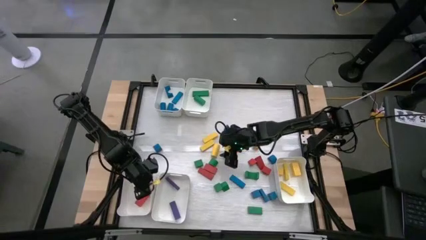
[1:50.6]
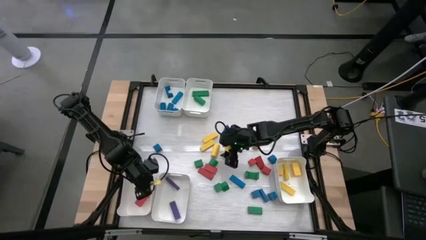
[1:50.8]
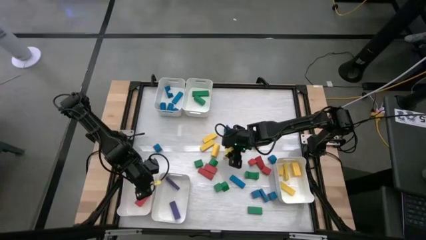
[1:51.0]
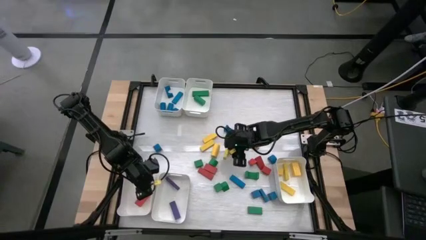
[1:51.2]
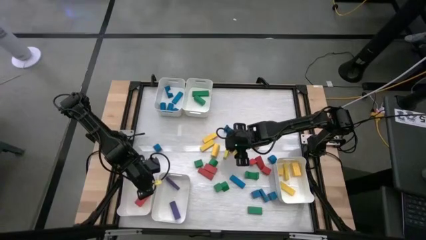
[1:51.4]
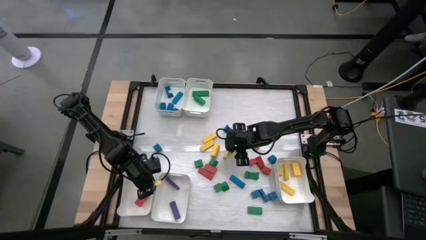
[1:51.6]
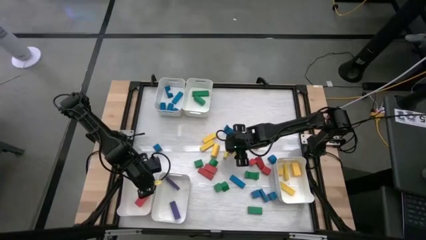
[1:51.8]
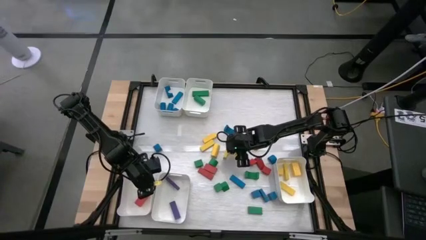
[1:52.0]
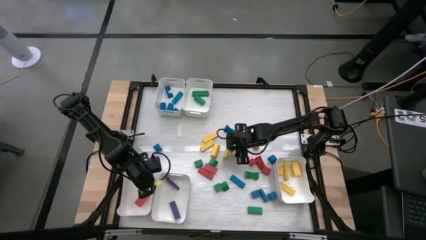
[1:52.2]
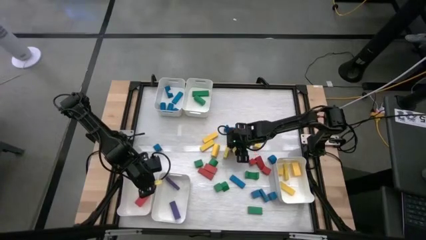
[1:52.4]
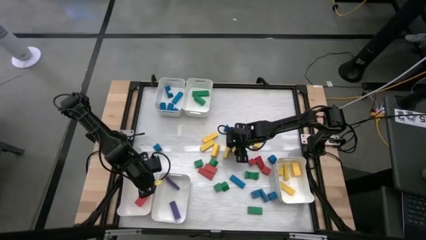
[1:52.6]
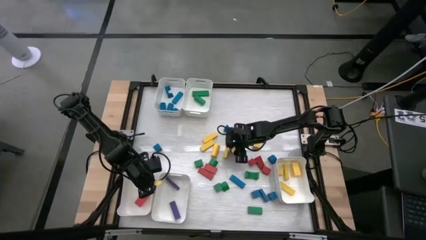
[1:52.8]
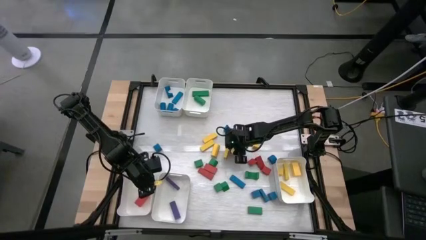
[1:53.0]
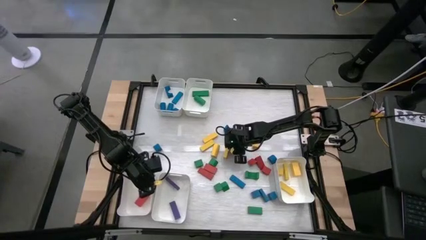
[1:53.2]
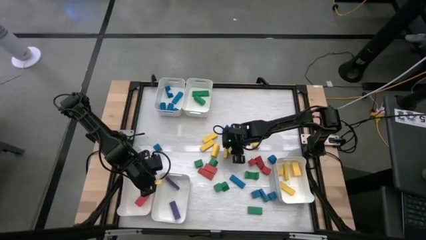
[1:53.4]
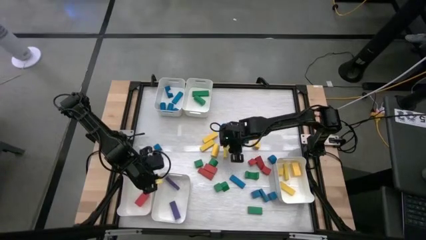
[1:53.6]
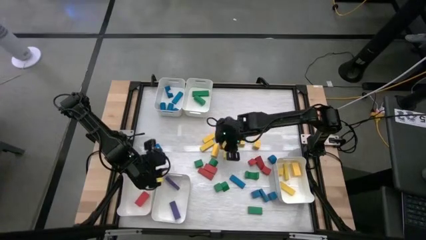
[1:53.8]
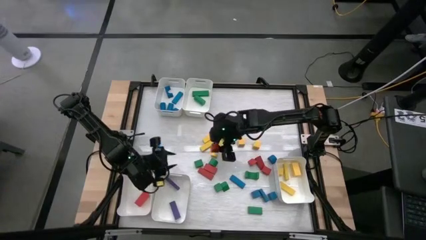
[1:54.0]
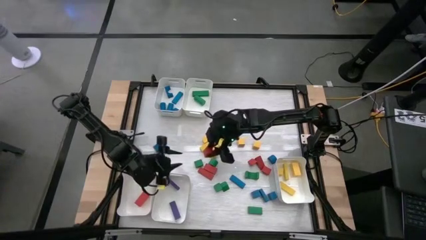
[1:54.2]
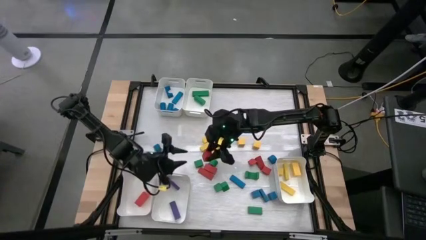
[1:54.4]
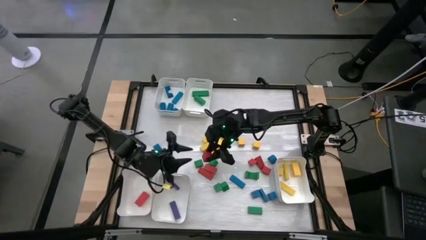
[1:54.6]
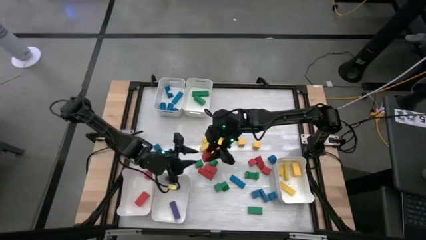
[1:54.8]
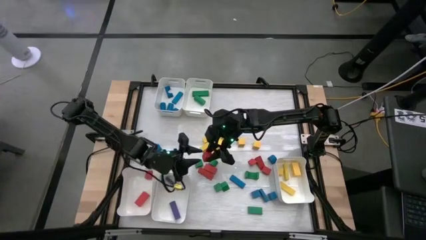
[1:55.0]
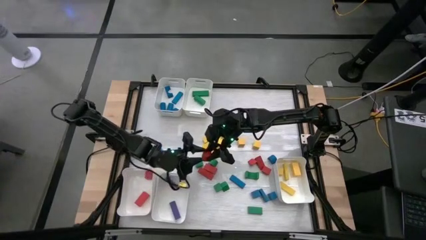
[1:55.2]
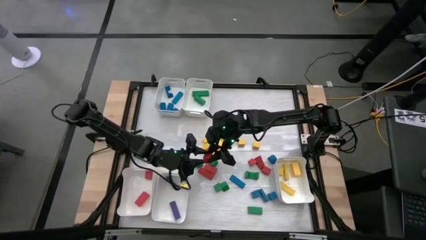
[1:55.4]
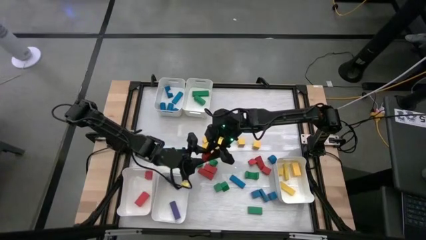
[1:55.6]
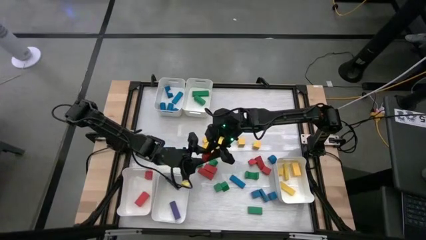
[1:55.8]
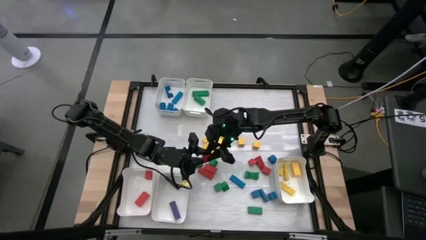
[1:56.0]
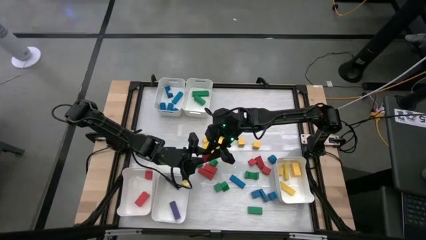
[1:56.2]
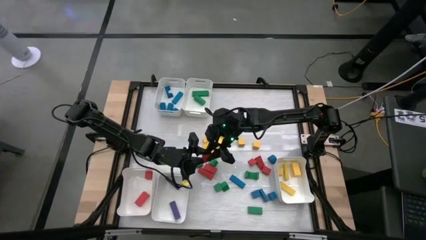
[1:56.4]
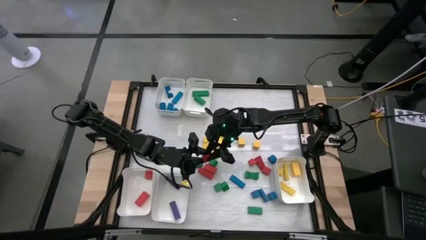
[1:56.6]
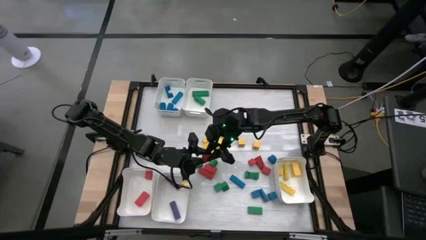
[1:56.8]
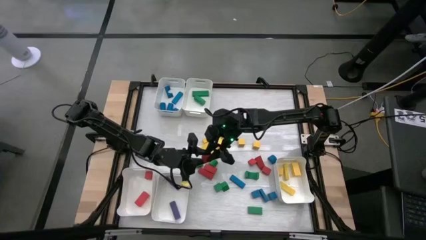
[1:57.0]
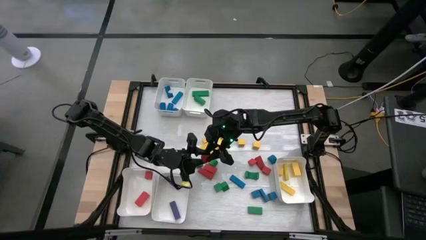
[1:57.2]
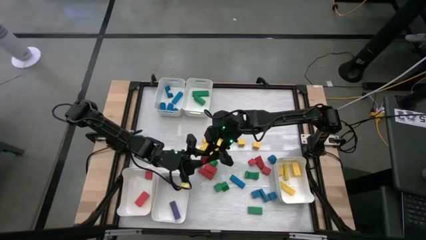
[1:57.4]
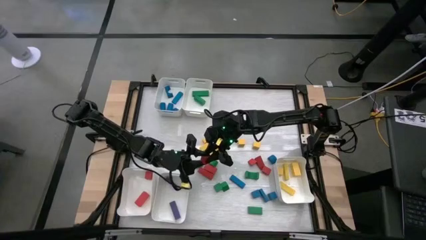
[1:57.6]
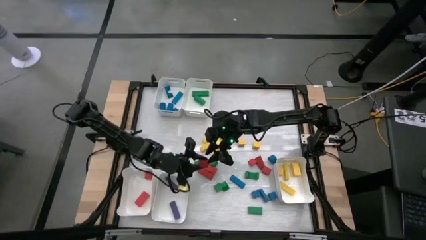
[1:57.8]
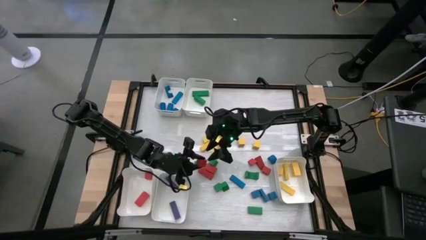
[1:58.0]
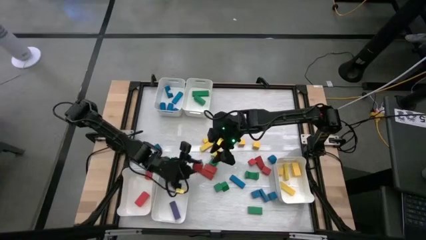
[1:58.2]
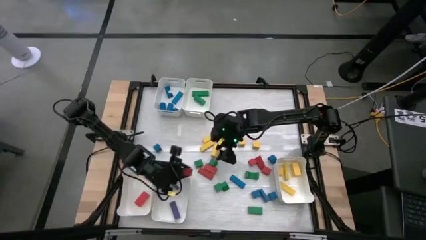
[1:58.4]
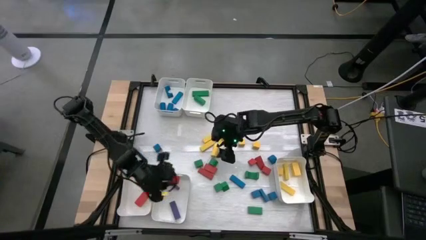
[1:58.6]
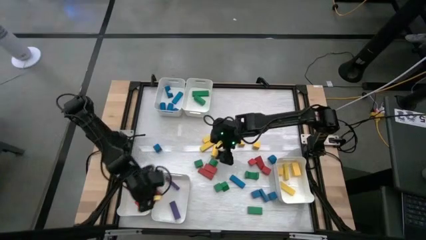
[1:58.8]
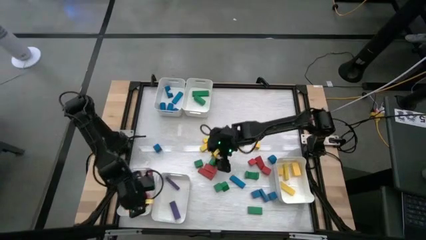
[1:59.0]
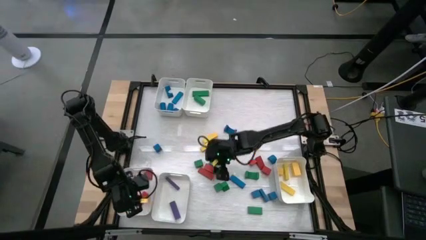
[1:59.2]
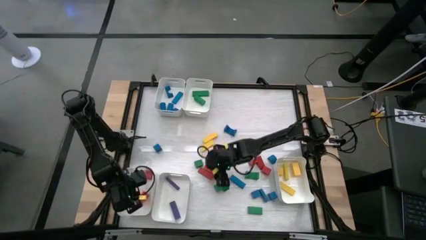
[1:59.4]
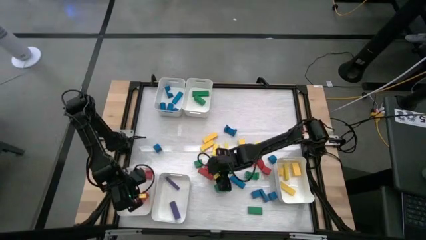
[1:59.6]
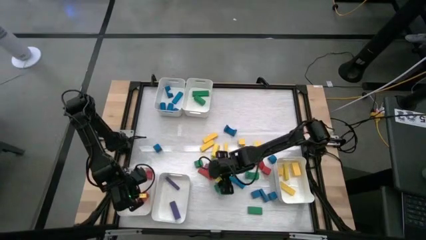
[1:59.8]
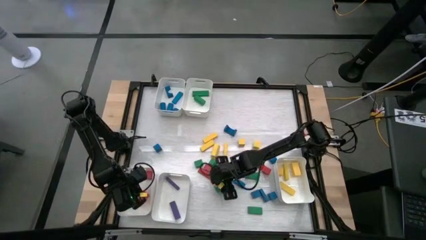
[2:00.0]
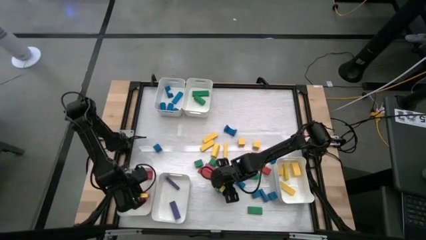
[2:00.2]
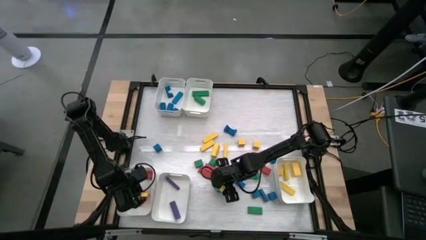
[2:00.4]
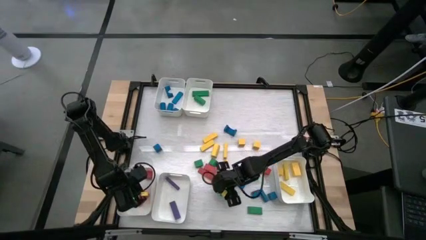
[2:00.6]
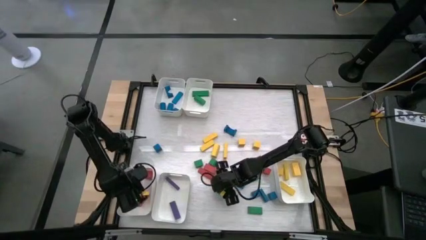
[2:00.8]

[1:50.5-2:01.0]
Task: Sort blocks
Put the red block into the bottom left white bin

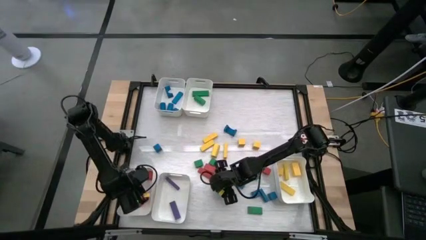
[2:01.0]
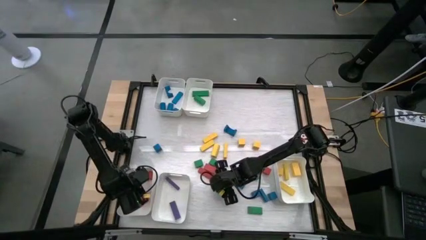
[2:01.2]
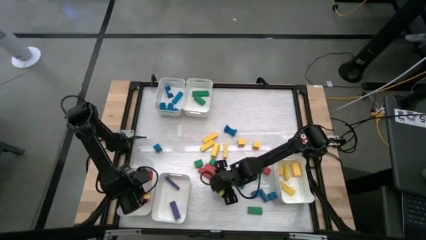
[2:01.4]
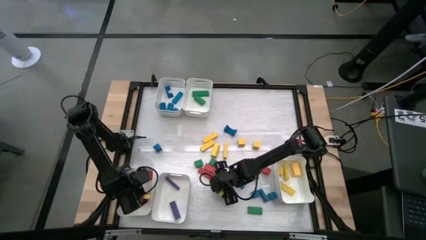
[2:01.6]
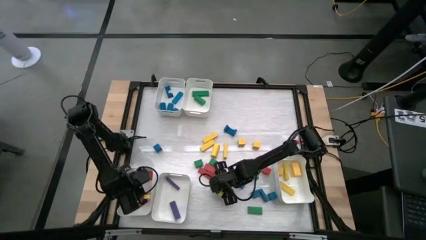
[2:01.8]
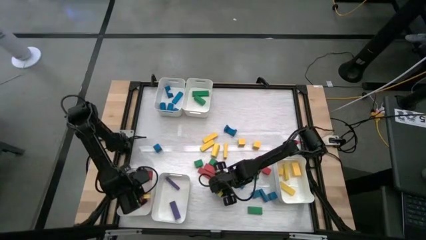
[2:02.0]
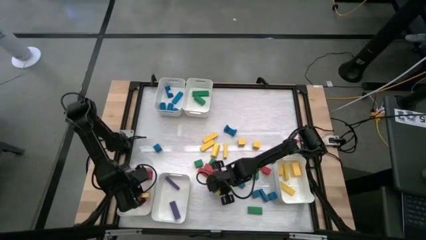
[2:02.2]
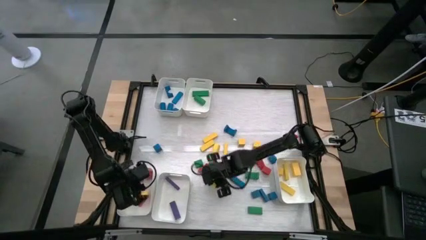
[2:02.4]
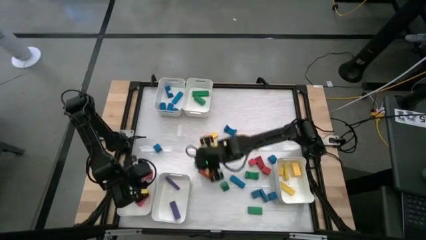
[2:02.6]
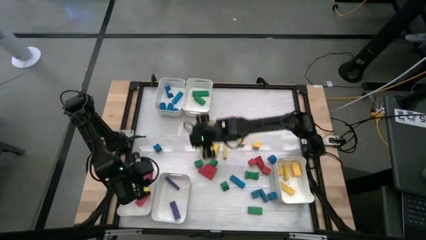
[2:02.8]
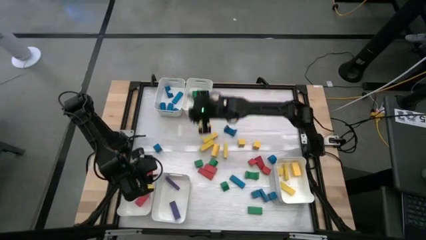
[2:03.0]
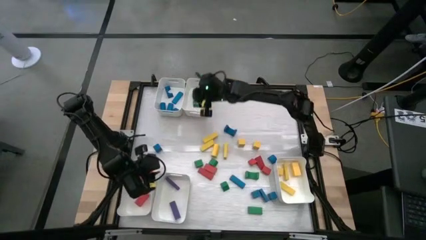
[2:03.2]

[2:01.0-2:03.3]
Put the green block into the top right white bin

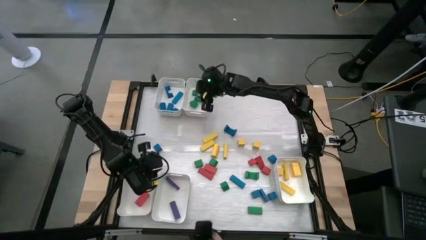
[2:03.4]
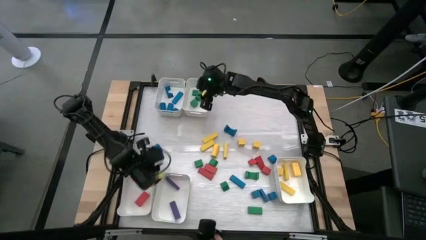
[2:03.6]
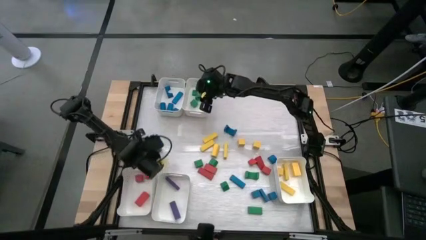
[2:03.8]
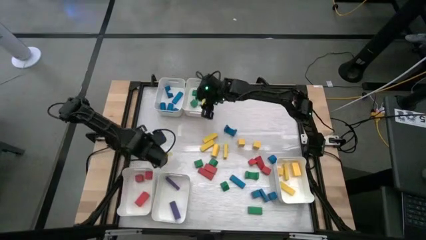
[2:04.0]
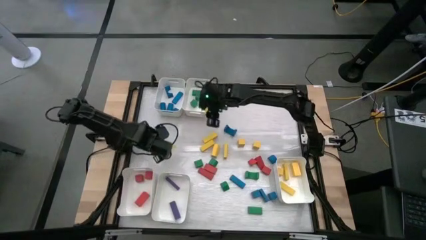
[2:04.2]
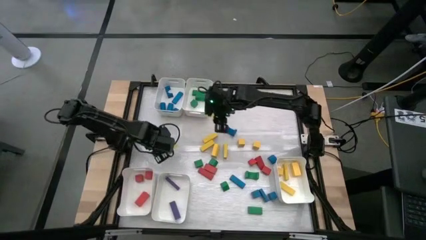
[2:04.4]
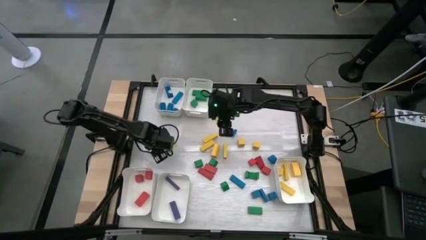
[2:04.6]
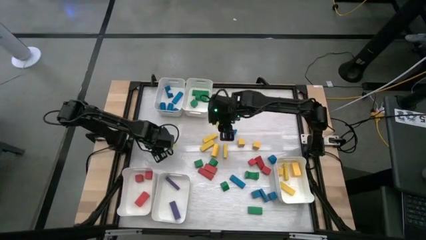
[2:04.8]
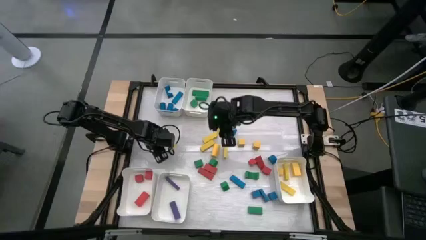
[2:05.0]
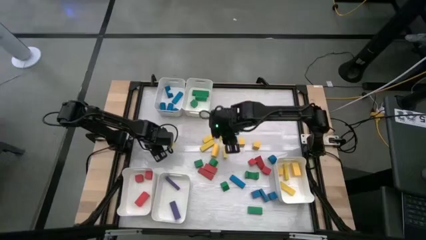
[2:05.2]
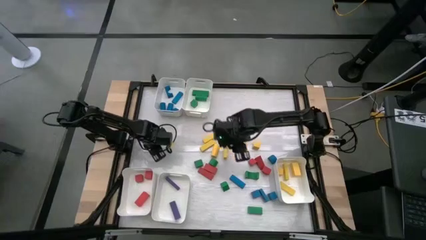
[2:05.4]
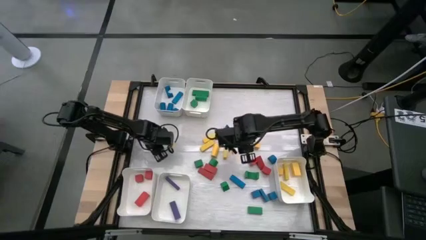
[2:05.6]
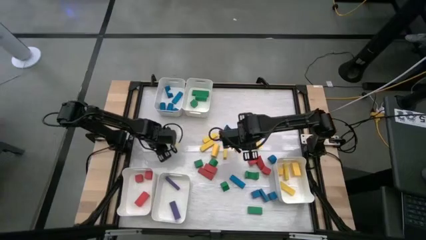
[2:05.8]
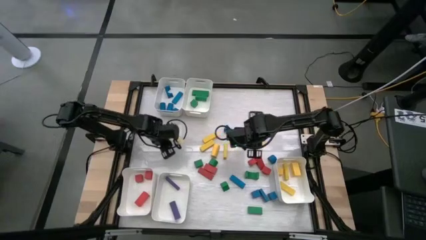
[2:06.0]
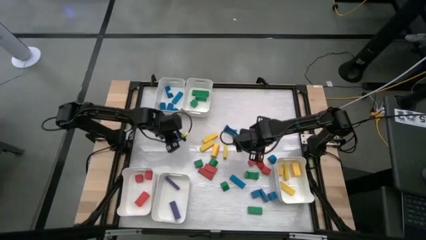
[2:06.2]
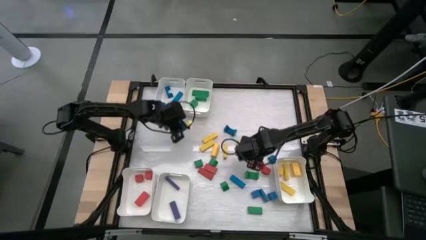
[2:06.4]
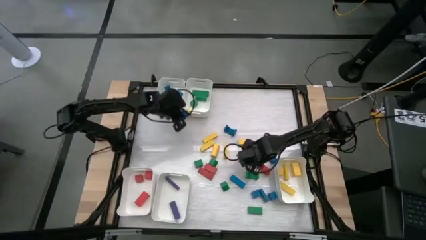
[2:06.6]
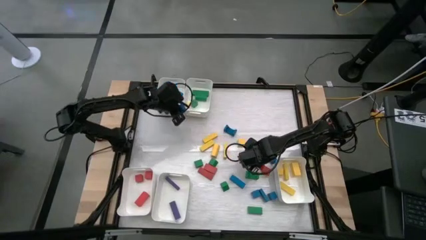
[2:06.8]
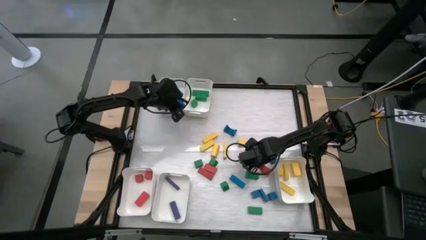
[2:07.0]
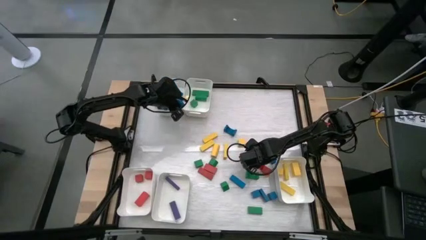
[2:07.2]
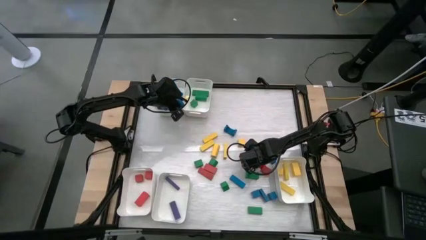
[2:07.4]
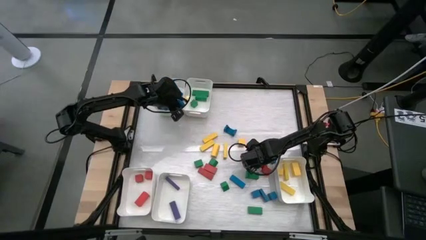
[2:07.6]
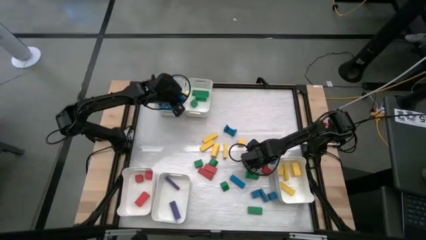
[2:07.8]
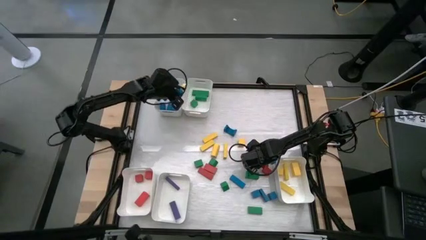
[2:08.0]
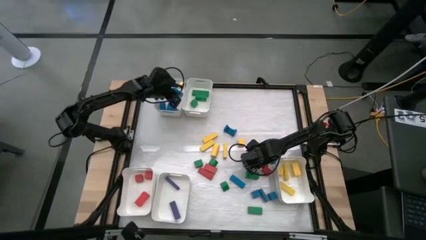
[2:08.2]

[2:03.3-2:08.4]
Put the blue block into the top left white bin
